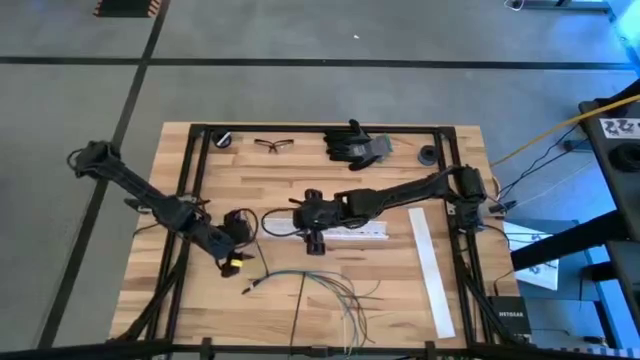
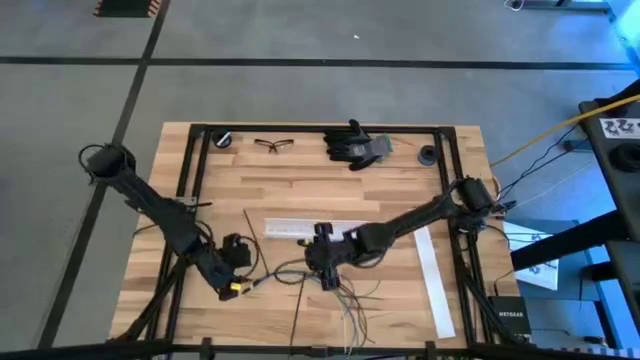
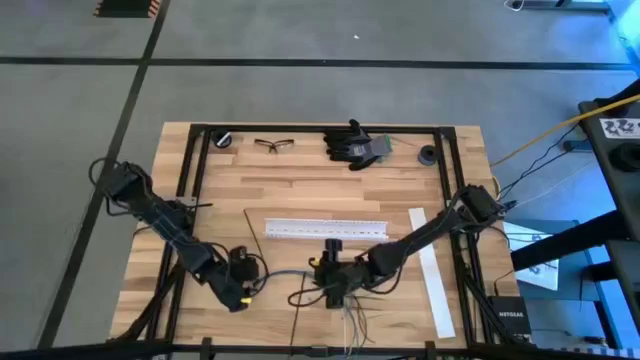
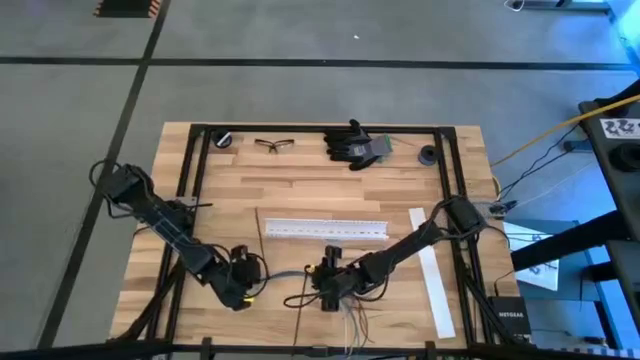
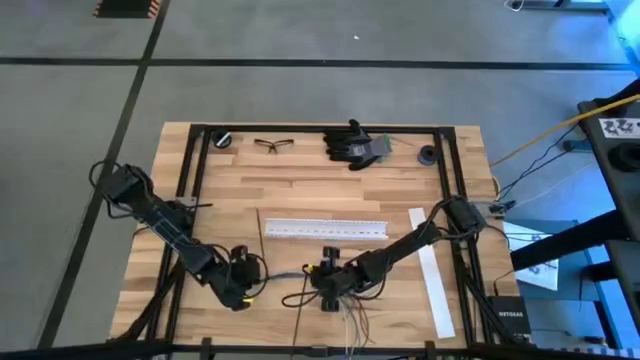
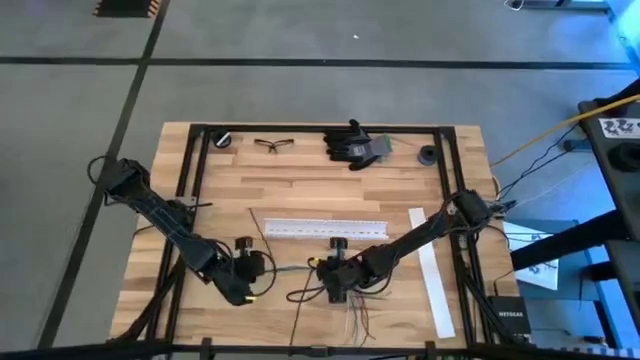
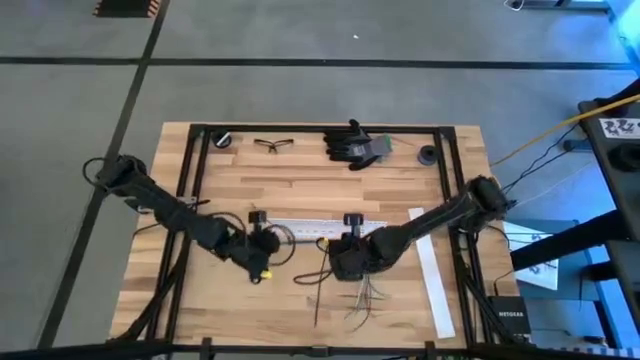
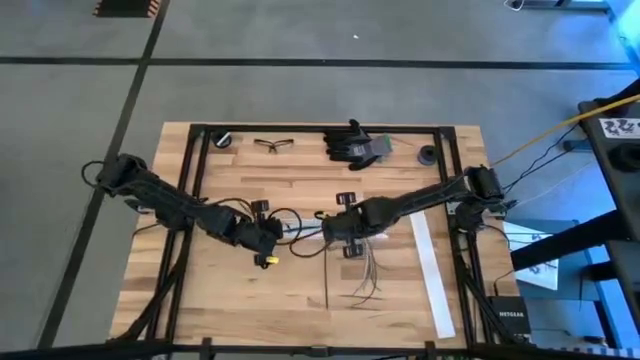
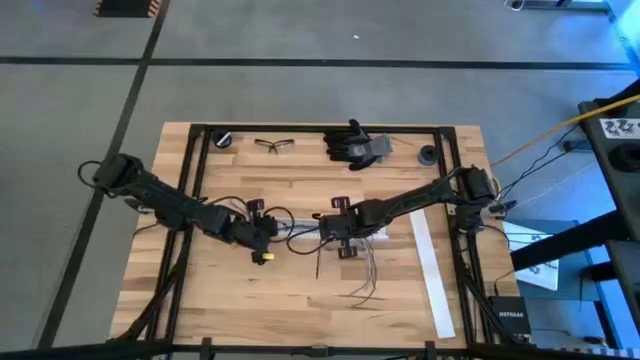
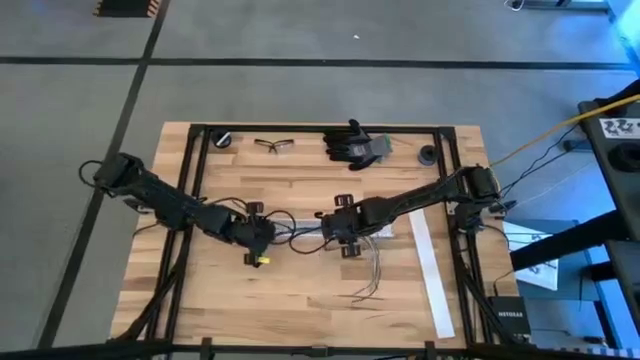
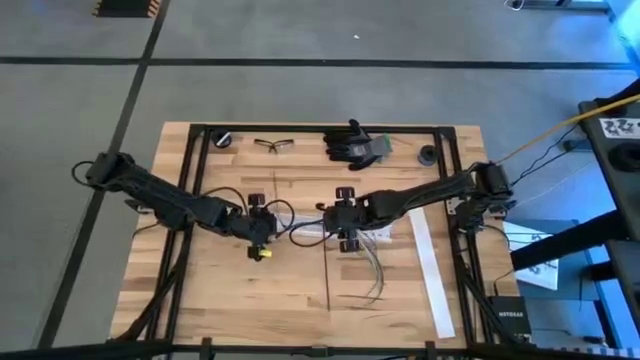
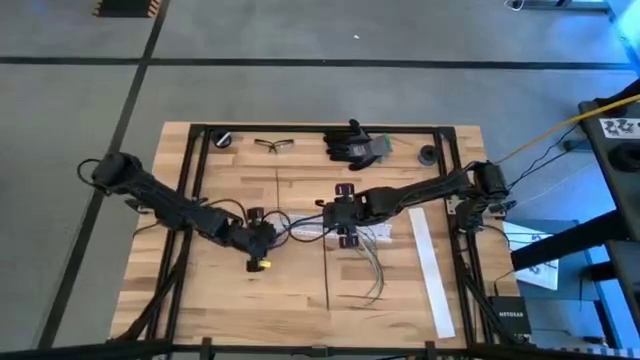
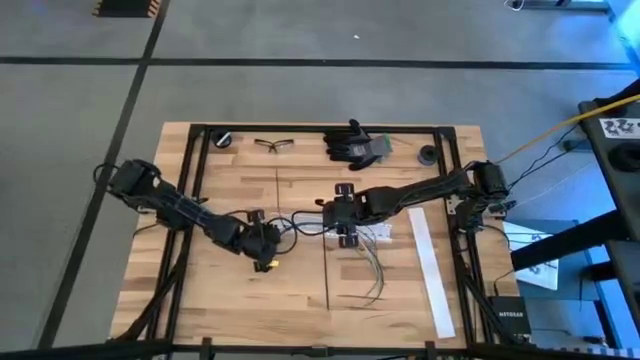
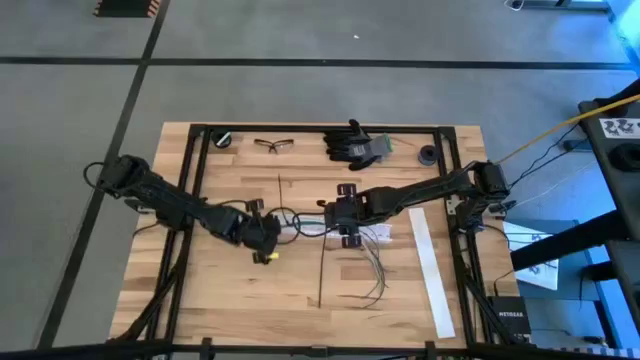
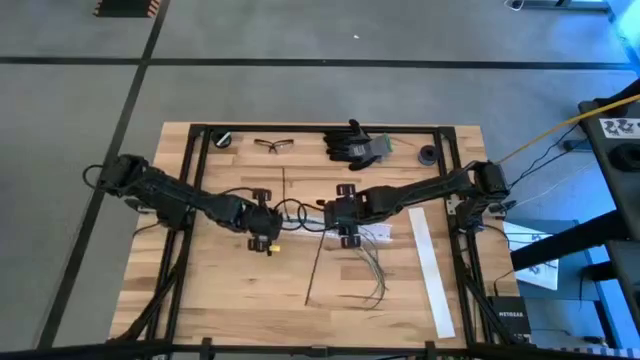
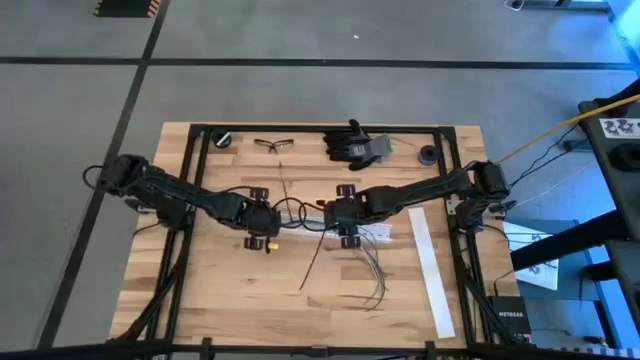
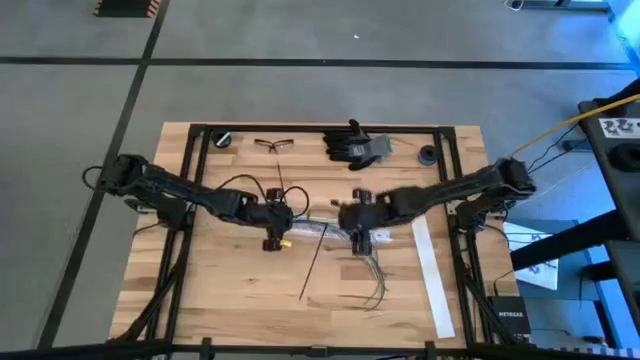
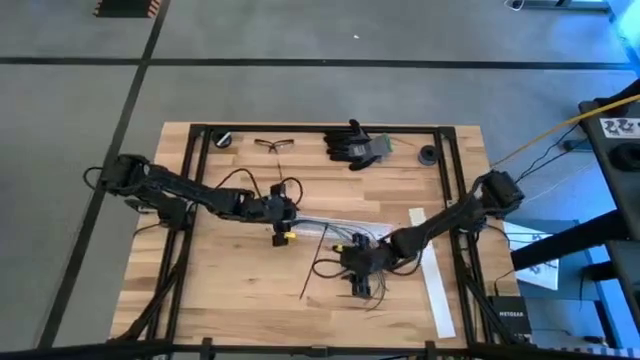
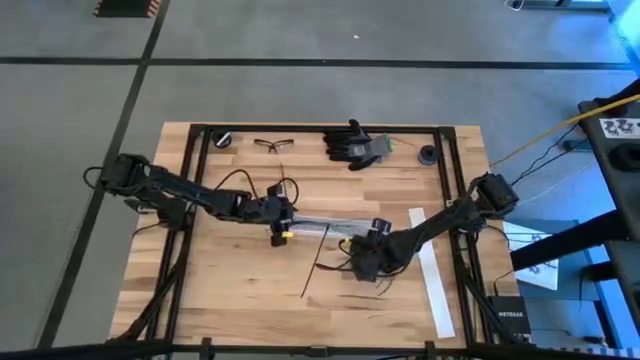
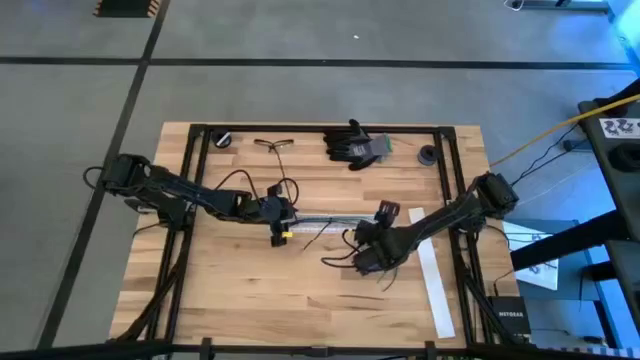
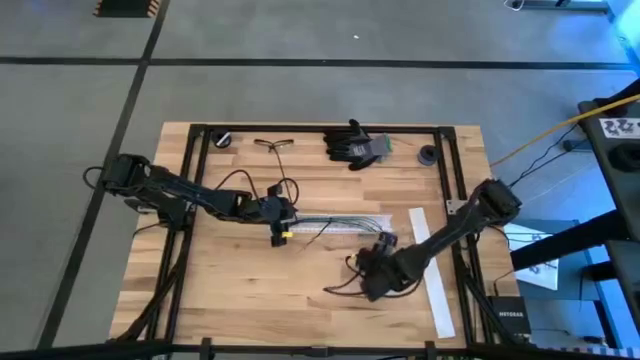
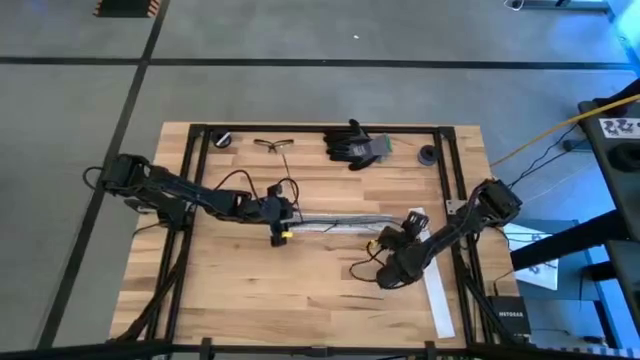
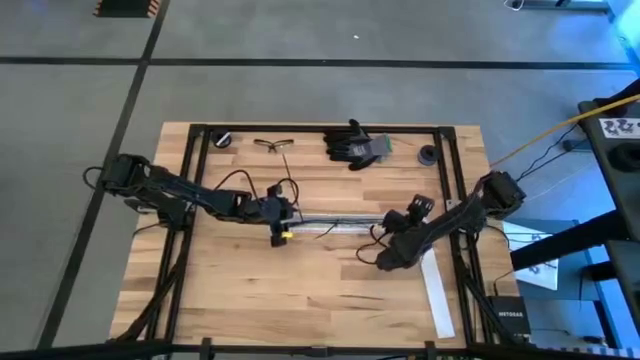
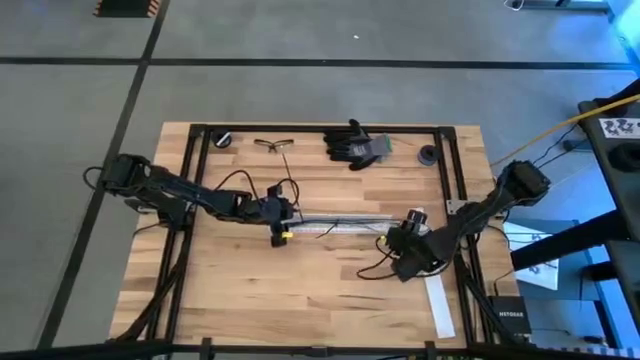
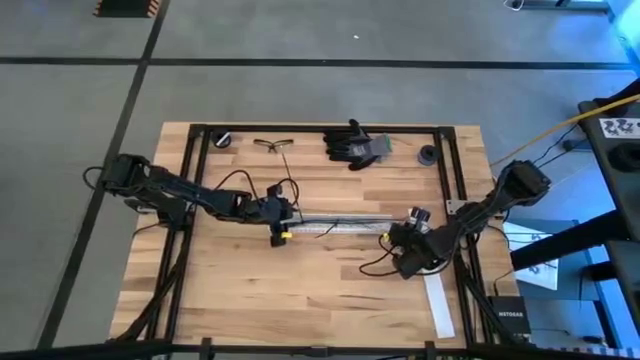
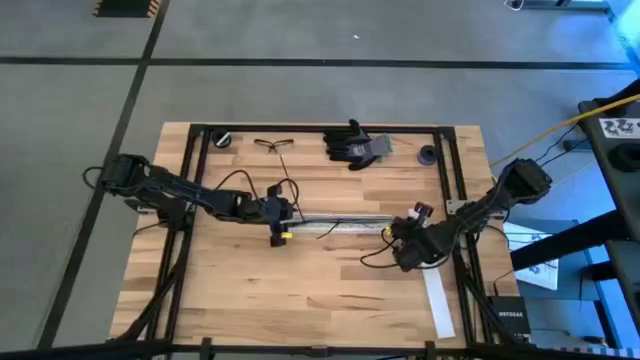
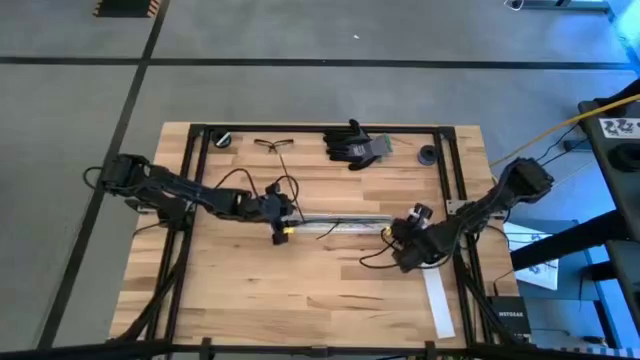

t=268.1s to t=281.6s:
Task: Ziptie cables
Put the wrapped cables into the white cable duct

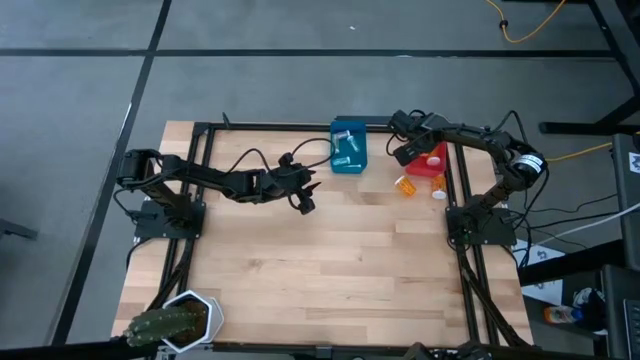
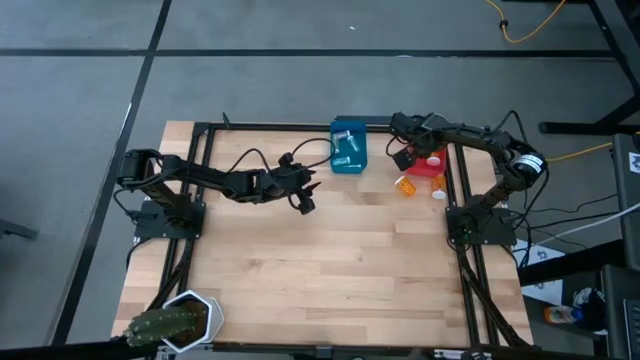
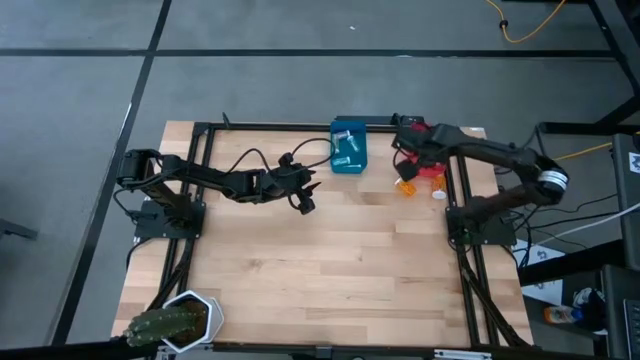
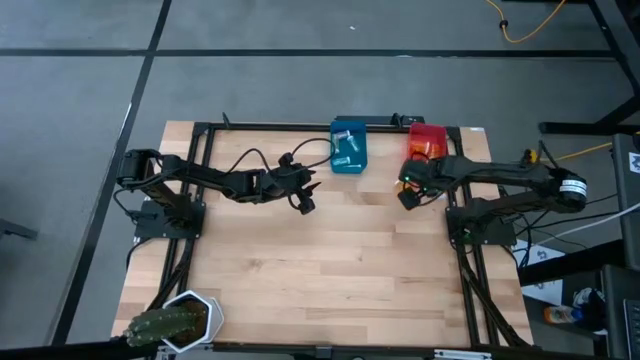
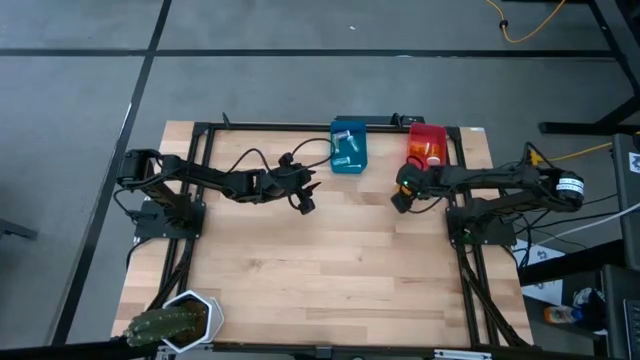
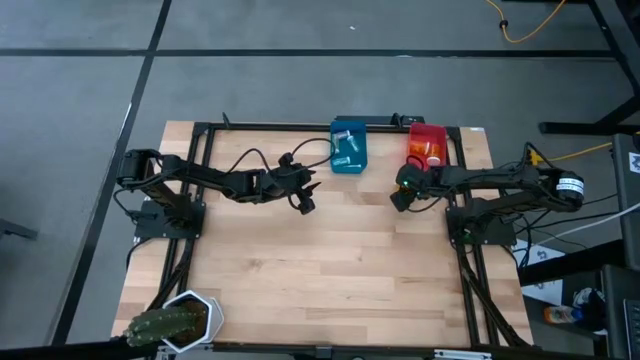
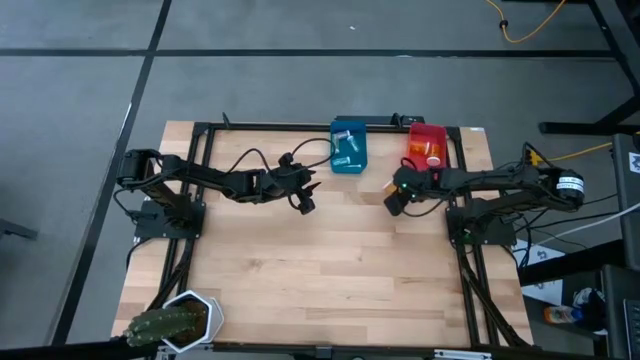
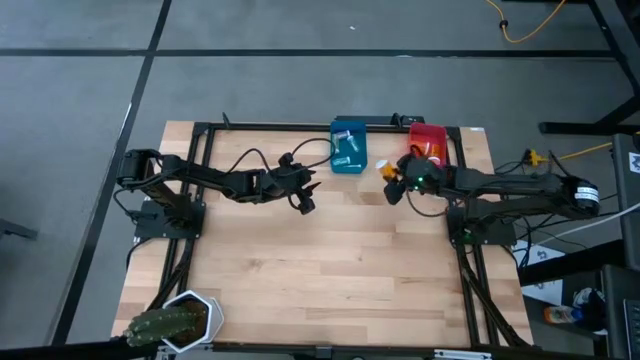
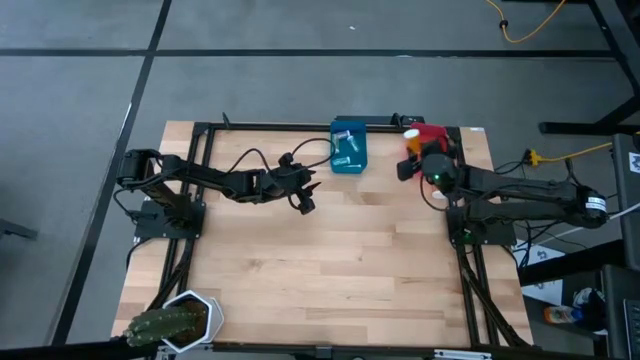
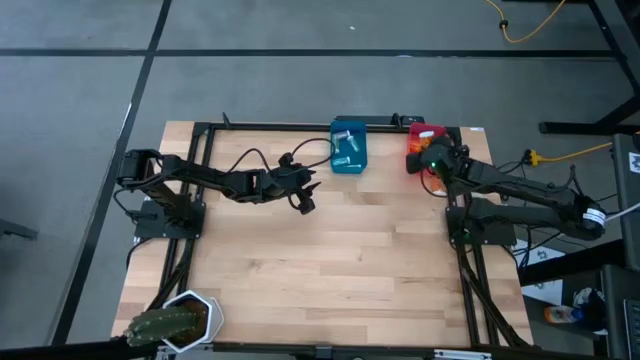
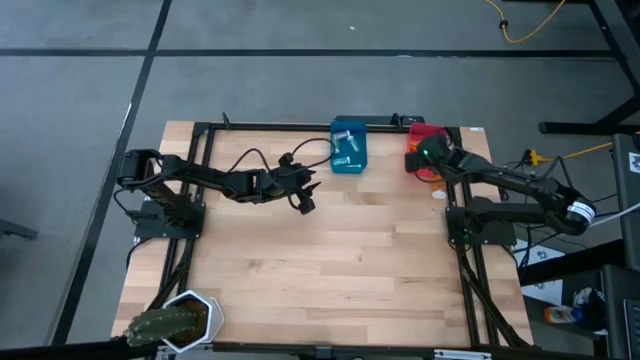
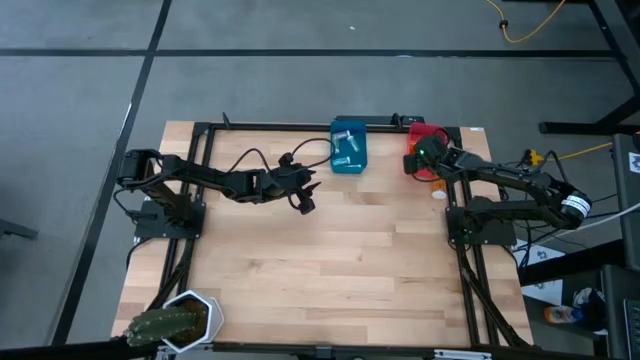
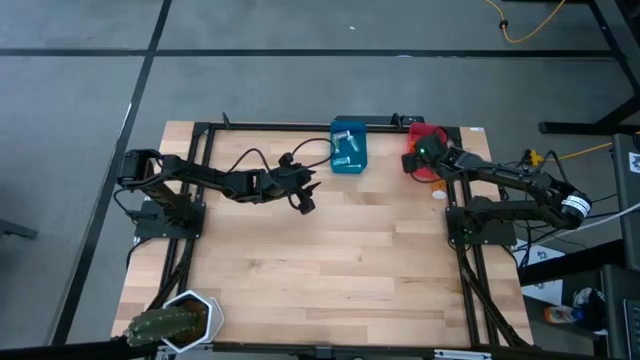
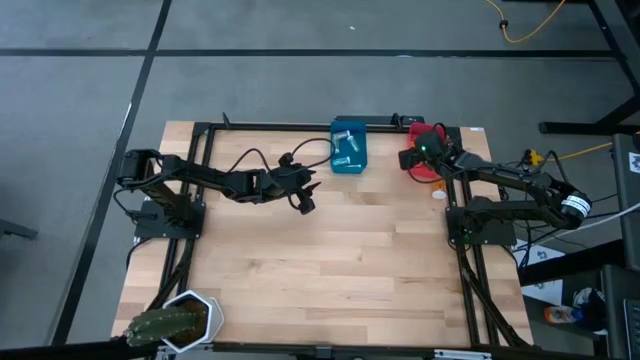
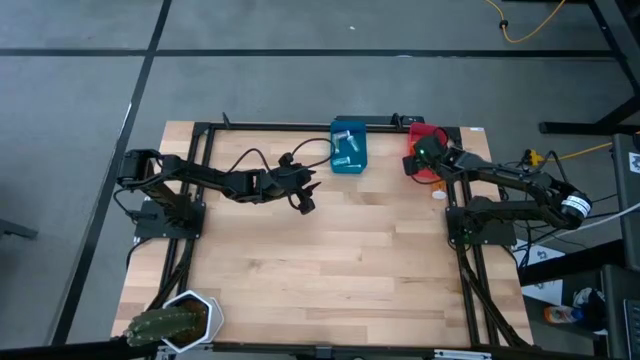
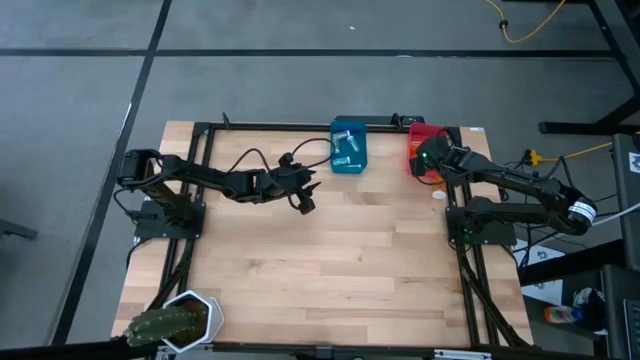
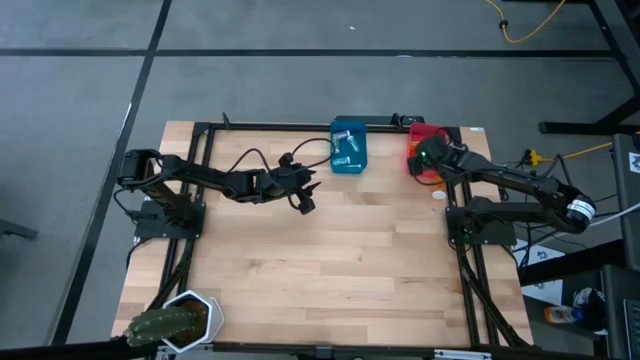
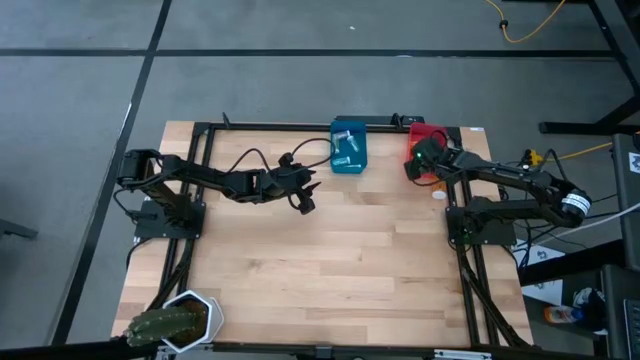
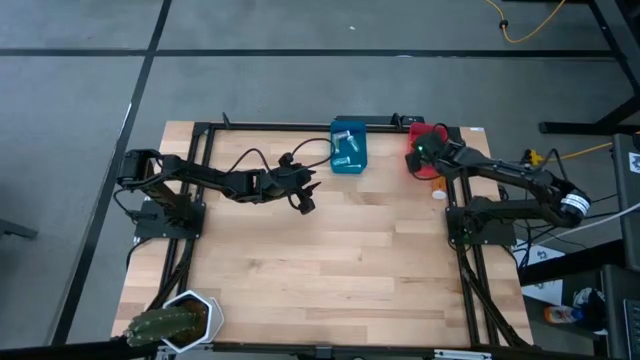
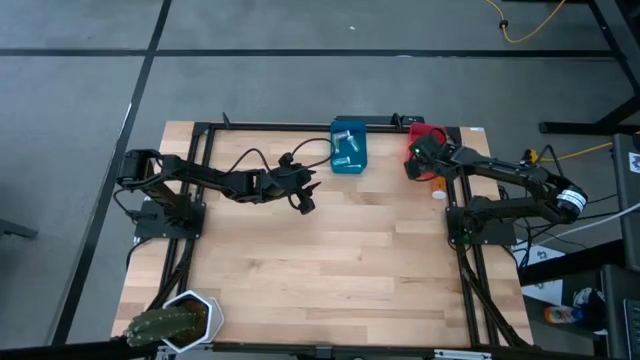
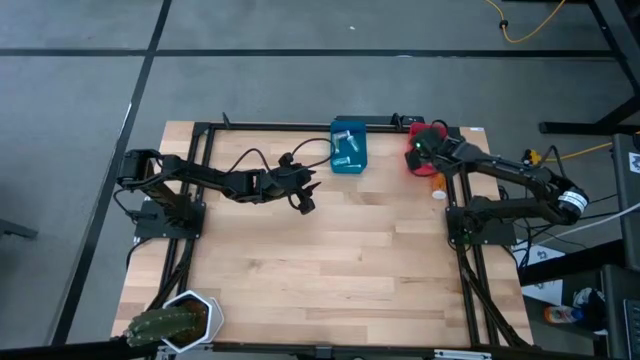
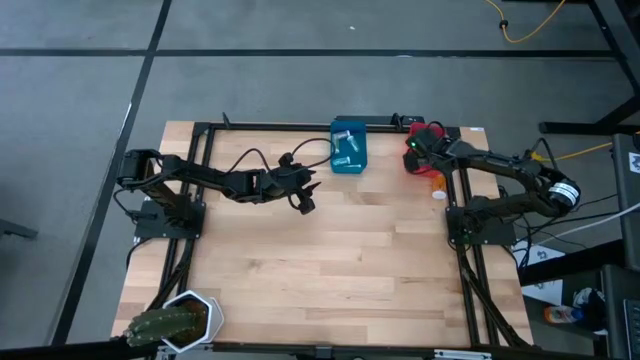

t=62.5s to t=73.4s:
Task: Pick and place medicine bottles into bin by pill shape (circle, oval)
Put the big orange pill bottle into the pink bin
